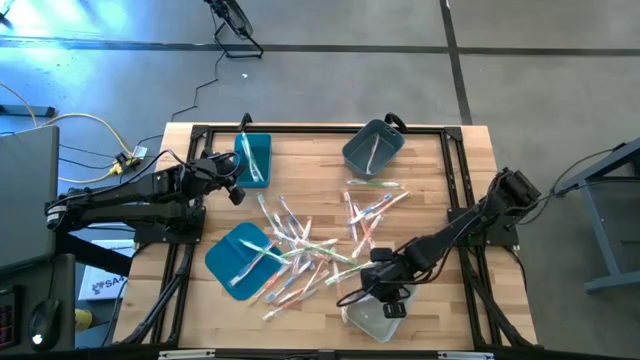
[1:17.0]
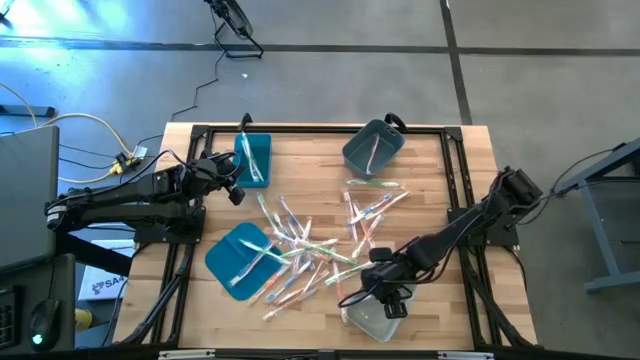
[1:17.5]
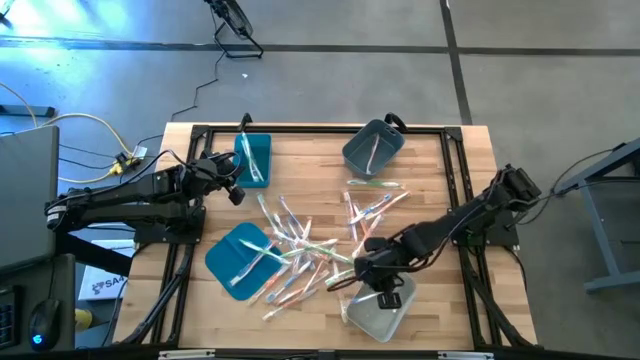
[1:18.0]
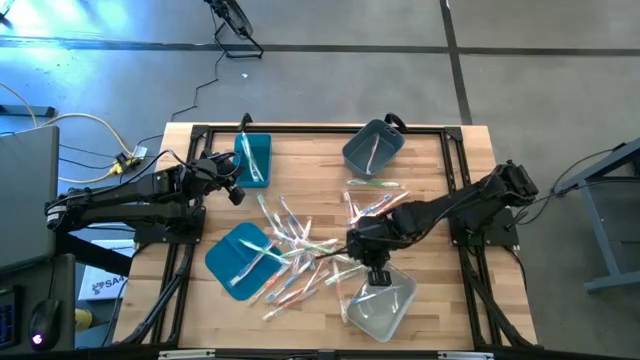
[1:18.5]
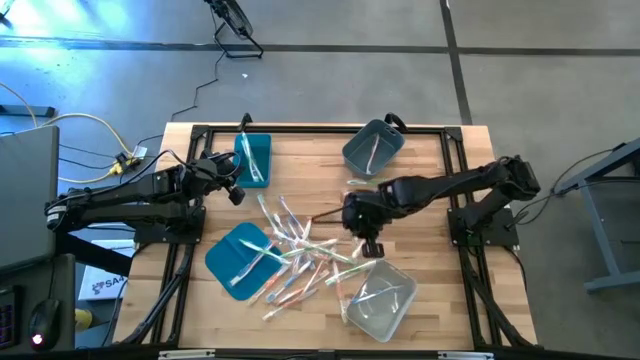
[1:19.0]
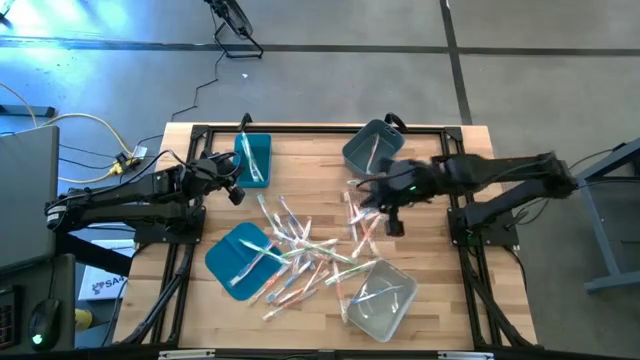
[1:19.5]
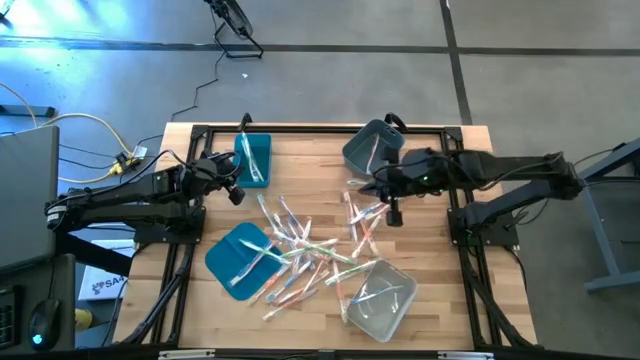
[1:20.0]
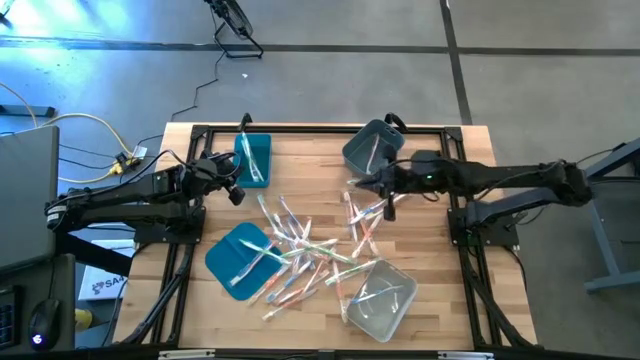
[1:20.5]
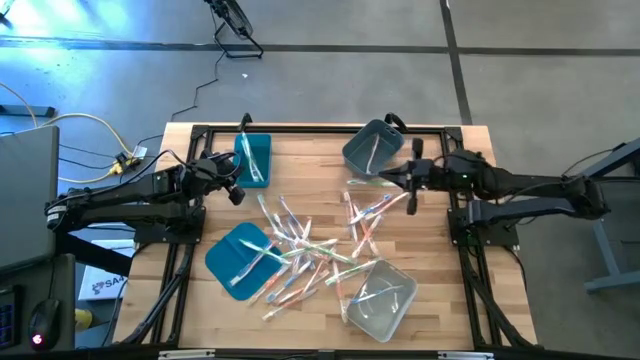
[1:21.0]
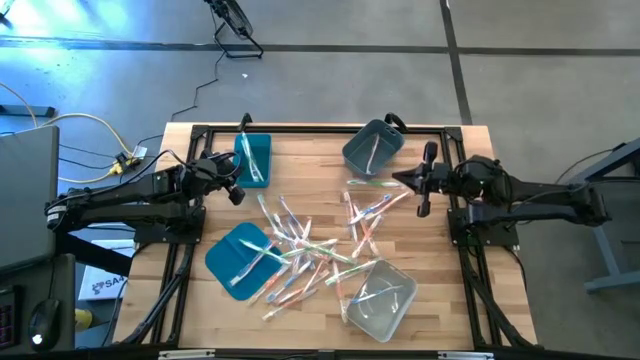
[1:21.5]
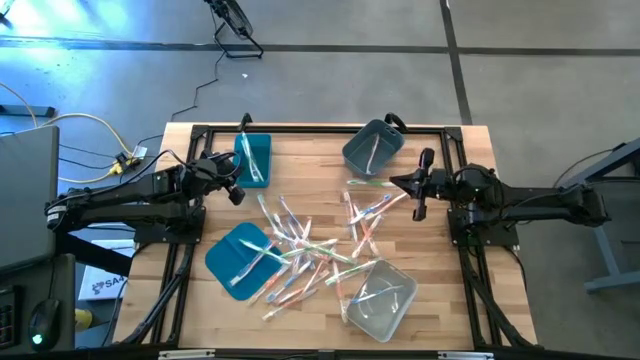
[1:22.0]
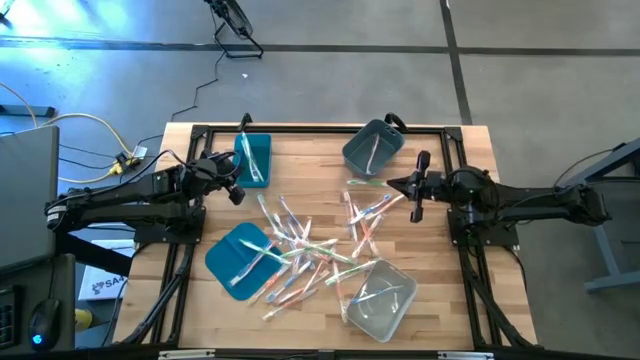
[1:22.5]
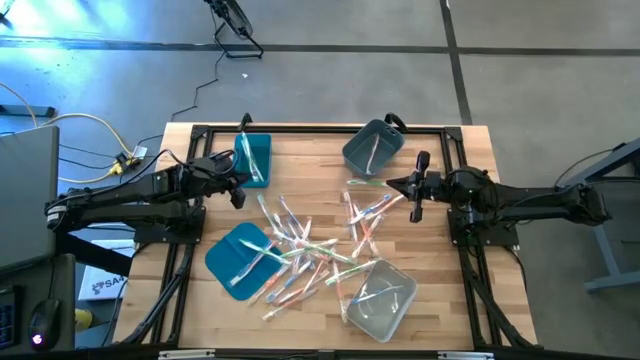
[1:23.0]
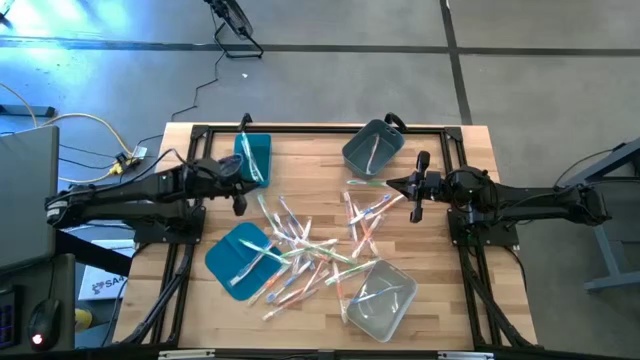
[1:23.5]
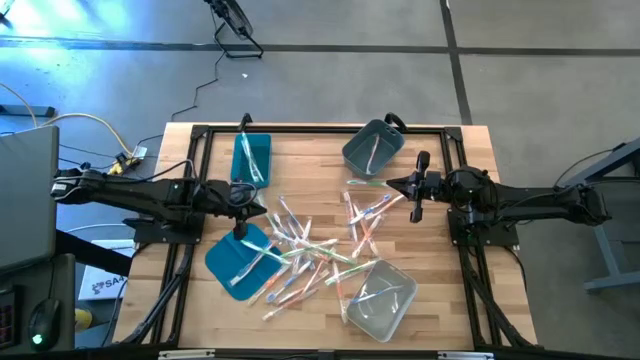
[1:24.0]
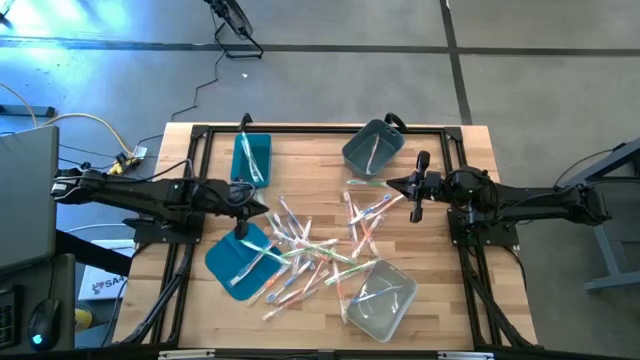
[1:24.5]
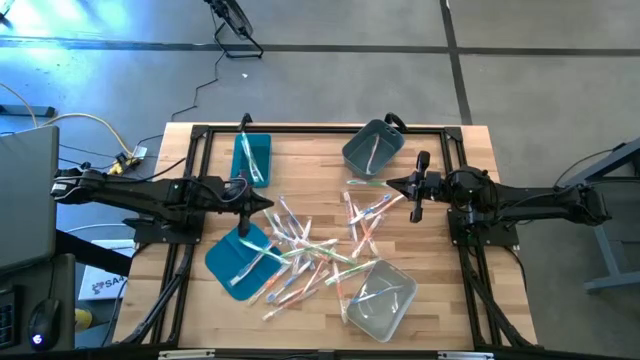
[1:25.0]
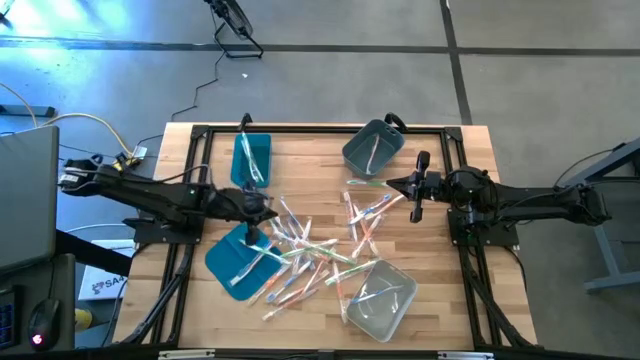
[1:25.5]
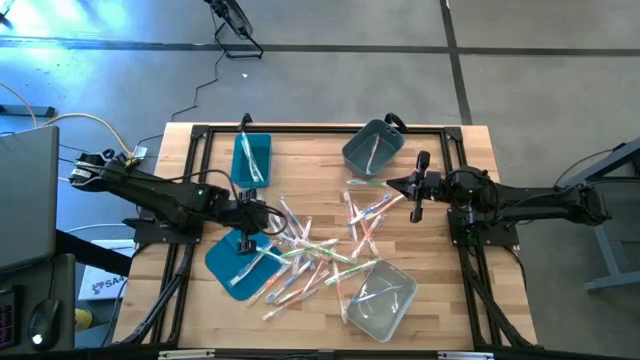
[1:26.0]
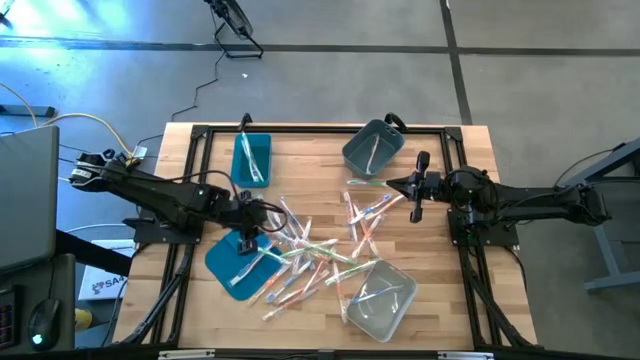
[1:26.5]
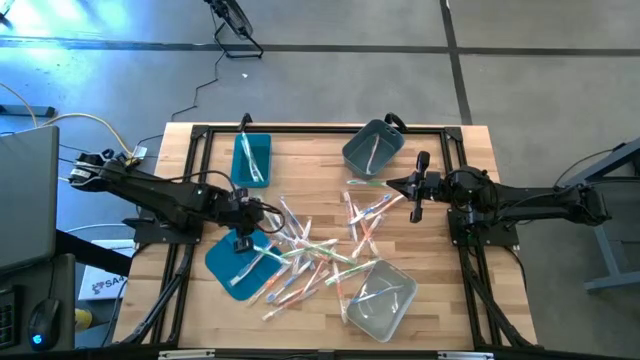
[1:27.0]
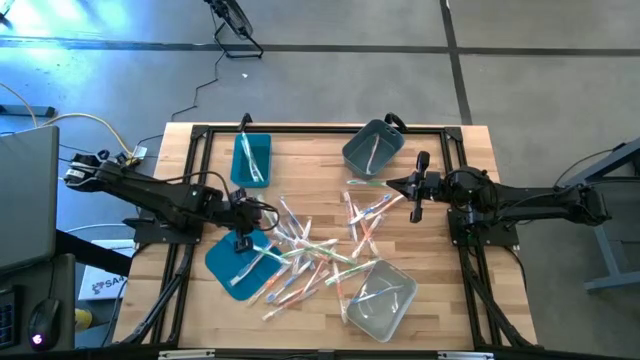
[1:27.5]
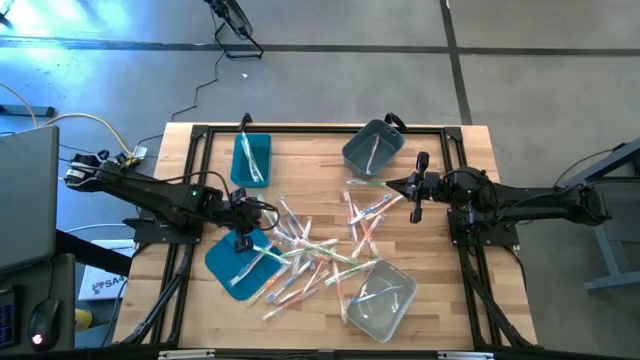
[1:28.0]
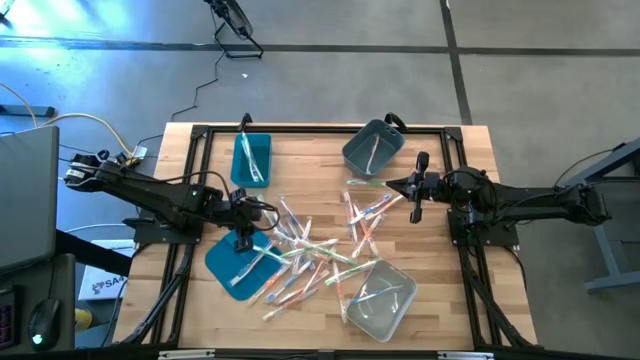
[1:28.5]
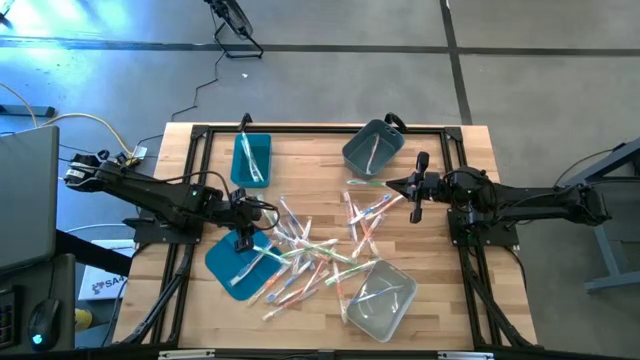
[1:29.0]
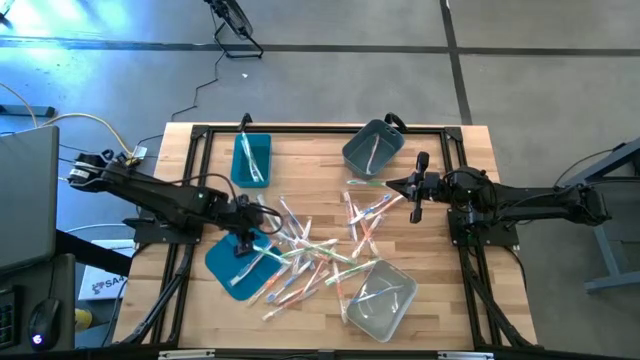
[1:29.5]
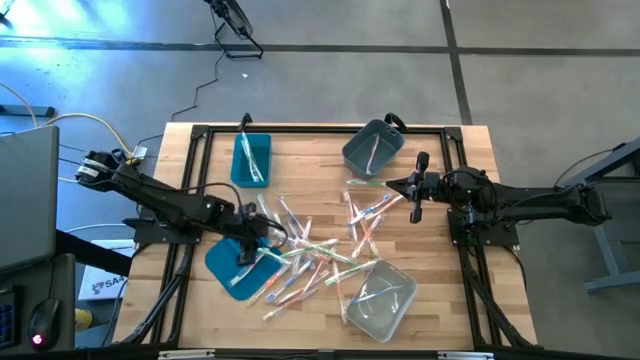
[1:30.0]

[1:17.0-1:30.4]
Task: Pick & Place Toothbrushes
Put the green toothbrush into the blue bin
